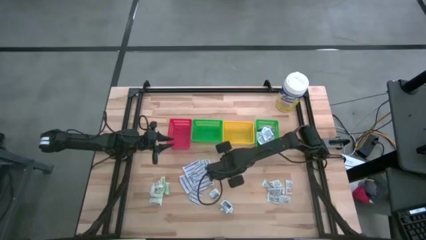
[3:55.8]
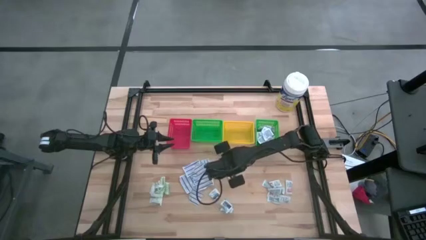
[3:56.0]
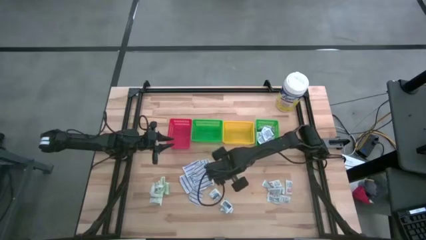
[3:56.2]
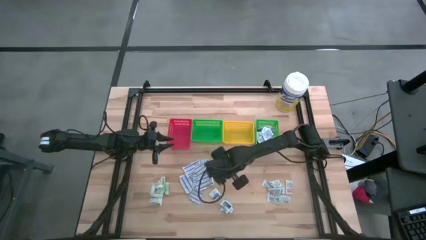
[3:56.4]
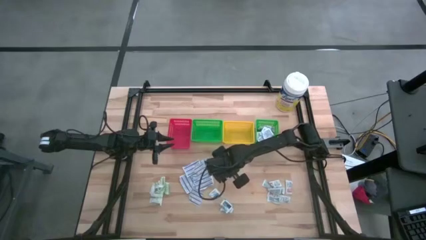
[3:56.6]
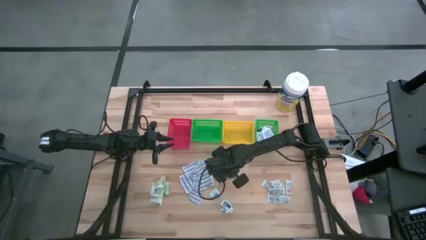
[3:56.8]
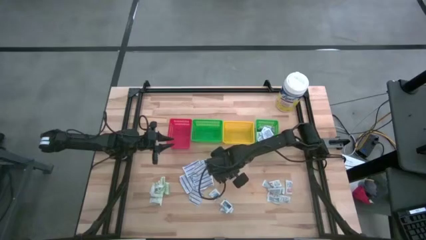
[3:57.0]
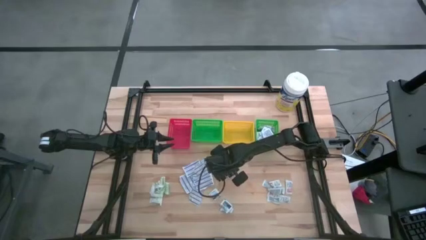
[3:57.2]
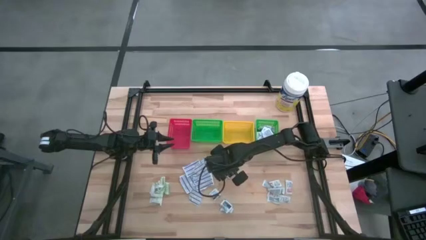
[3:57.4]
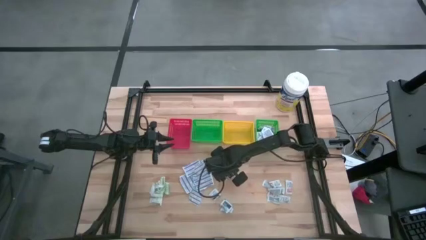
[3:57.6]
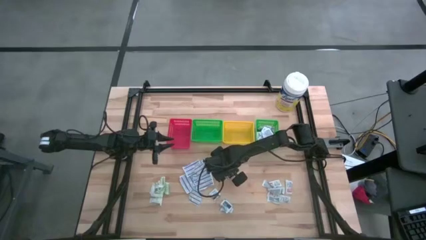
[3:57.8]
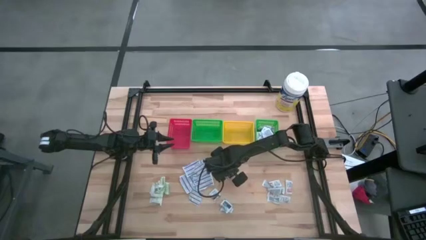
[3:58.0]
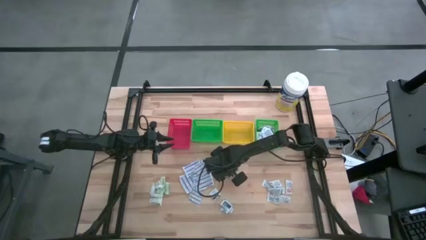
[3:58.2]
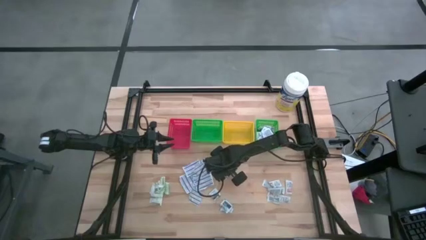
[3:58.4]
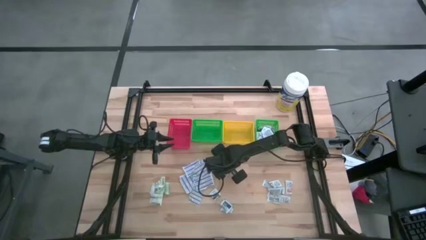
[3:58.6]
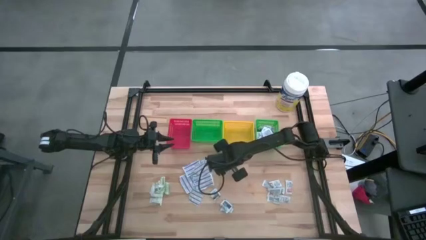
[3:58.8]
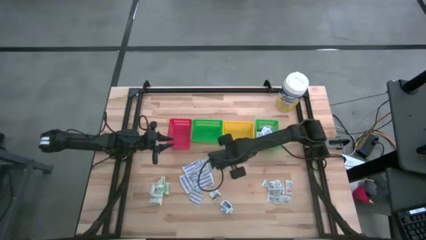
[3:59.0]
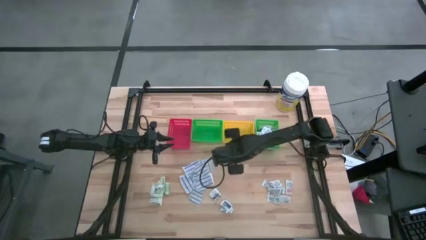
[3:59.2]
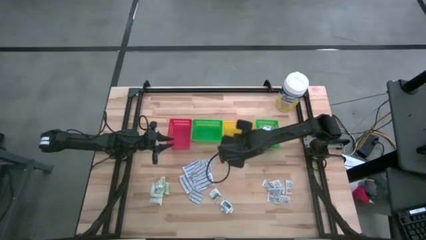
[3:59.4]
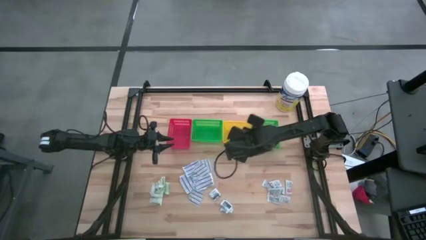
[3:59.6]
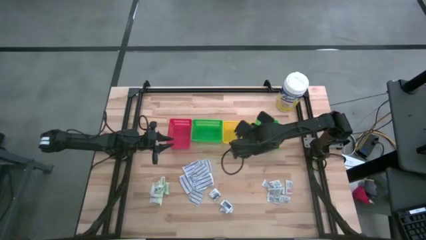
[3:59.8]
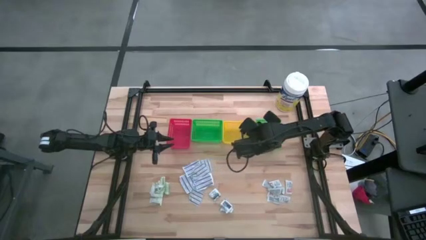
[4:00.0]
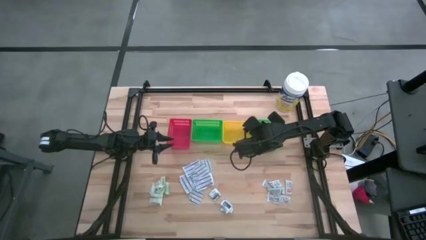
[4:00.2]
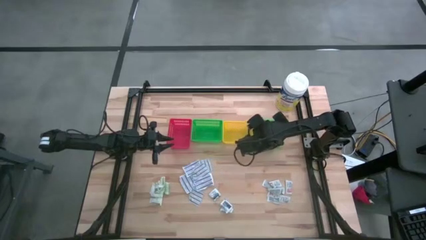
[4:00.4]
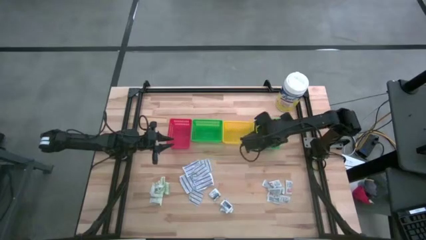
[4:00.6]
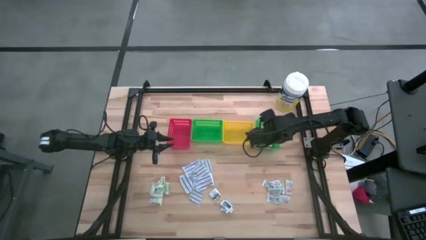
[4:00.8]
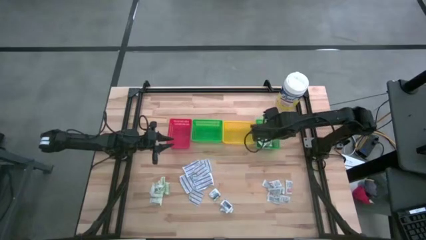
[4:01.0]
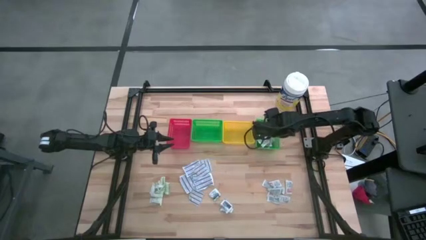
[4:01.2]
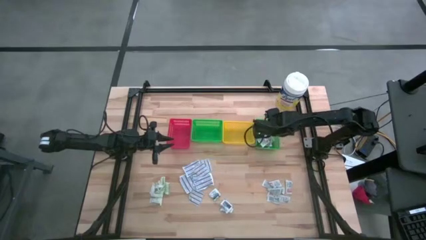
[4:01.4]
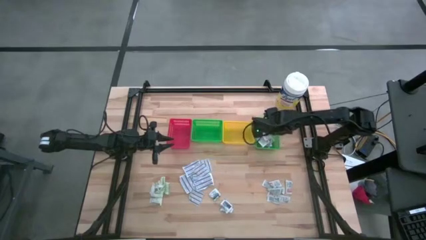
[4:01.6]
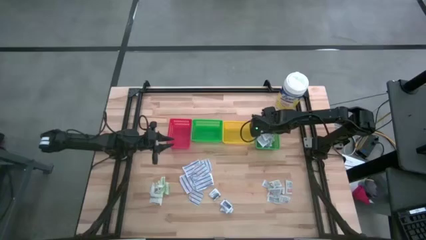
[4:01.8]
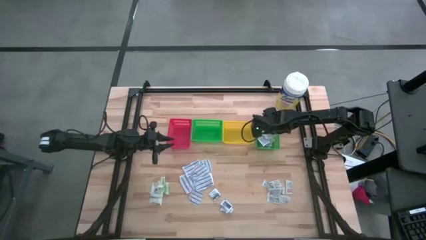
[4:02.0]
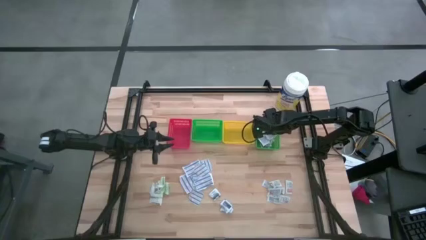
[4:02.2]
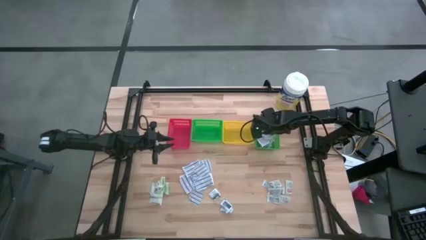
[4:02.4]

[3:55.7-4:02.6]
Task: Pick & Place First Aid Supplies
Put the blue alcohol pad into the right green bin

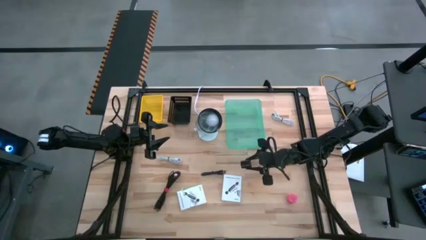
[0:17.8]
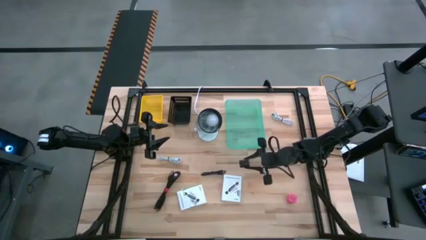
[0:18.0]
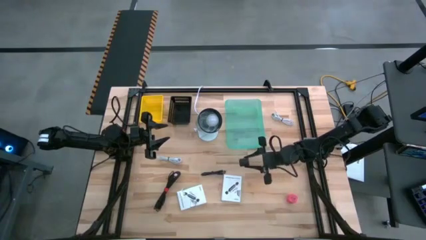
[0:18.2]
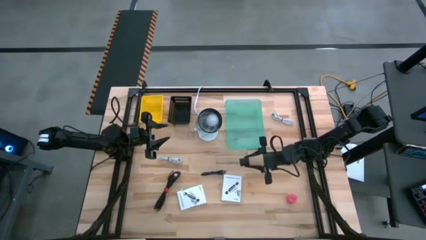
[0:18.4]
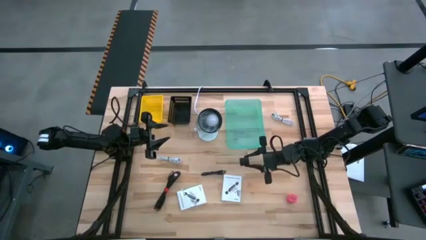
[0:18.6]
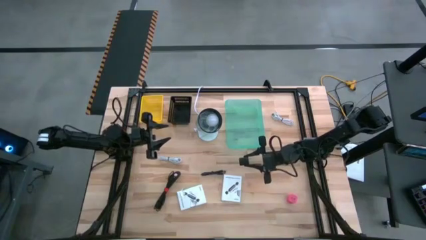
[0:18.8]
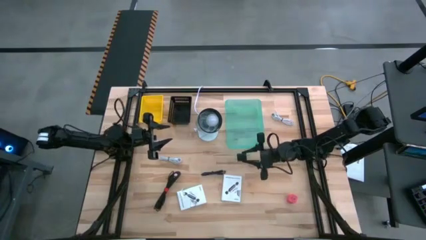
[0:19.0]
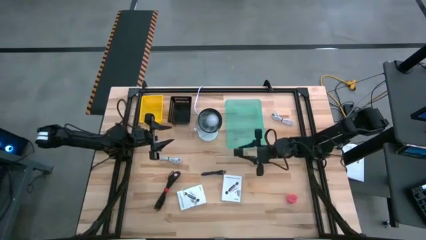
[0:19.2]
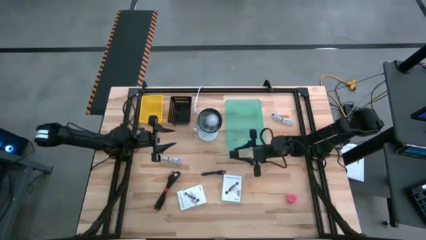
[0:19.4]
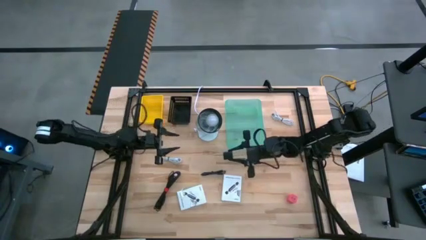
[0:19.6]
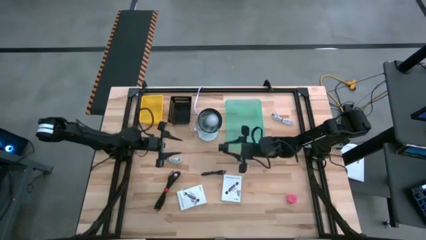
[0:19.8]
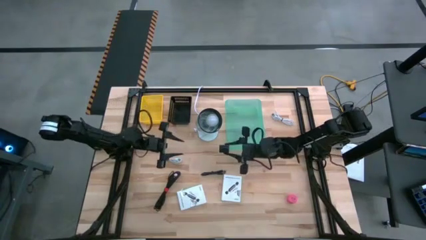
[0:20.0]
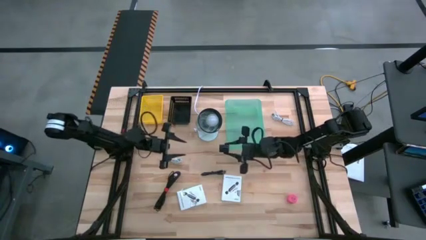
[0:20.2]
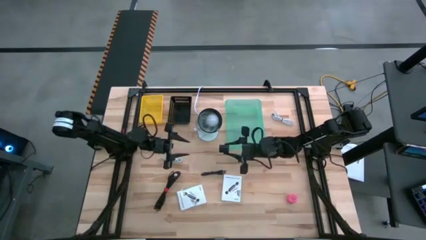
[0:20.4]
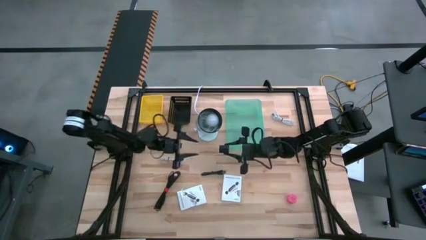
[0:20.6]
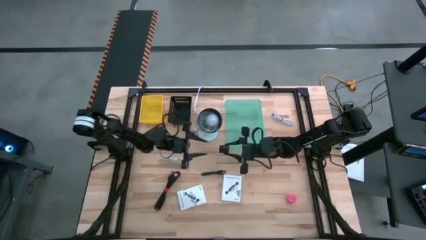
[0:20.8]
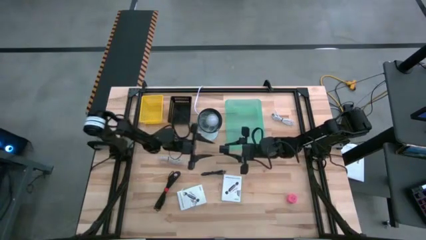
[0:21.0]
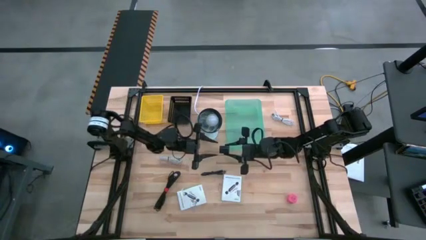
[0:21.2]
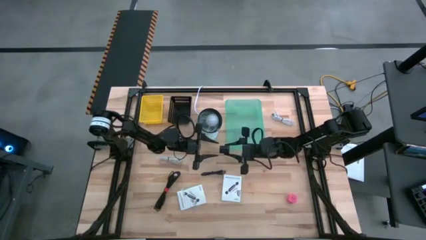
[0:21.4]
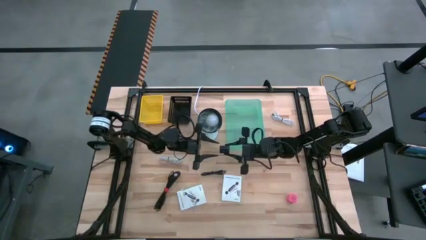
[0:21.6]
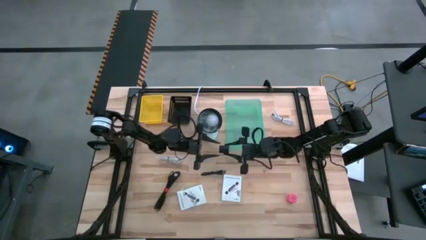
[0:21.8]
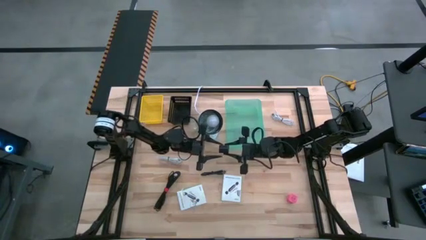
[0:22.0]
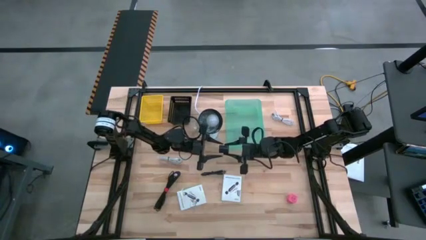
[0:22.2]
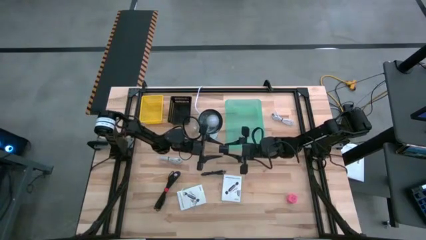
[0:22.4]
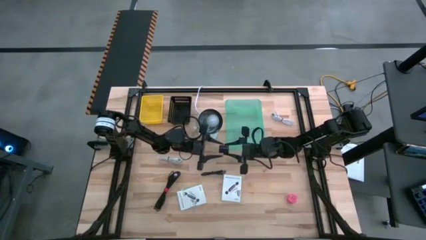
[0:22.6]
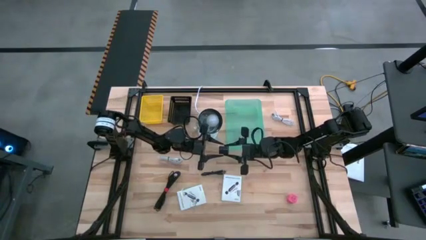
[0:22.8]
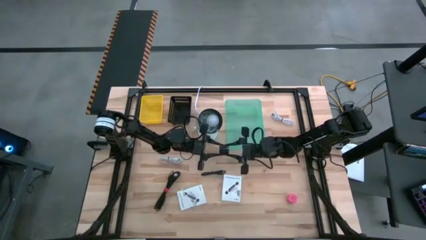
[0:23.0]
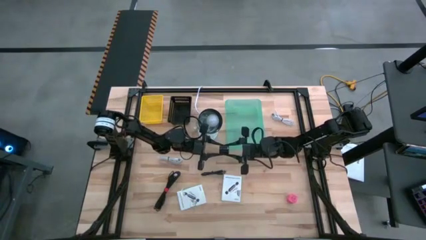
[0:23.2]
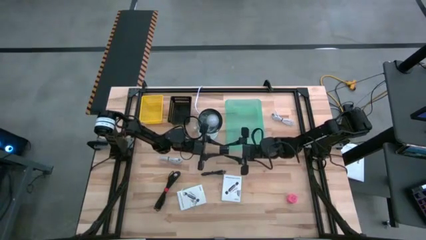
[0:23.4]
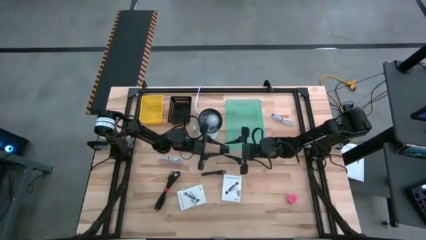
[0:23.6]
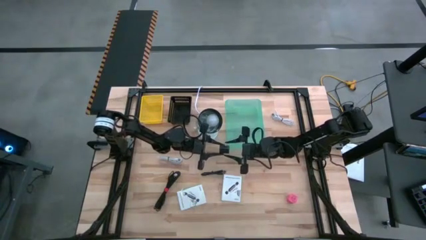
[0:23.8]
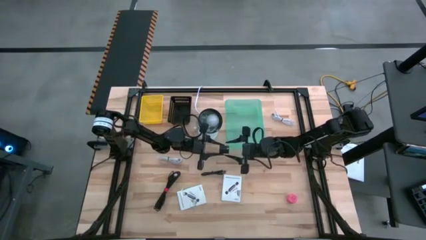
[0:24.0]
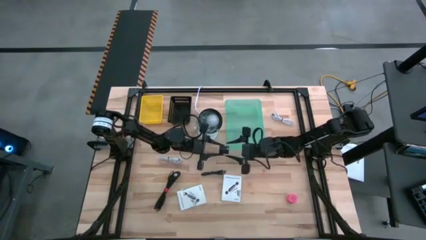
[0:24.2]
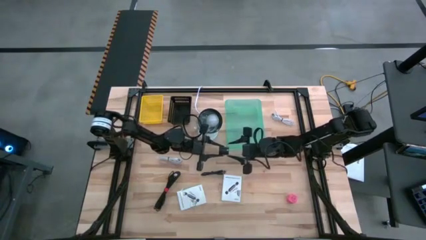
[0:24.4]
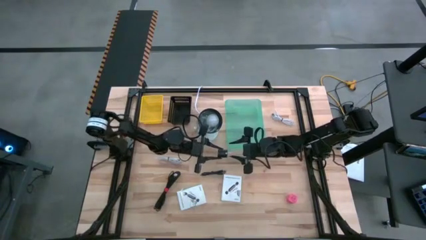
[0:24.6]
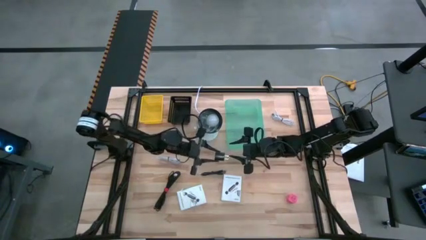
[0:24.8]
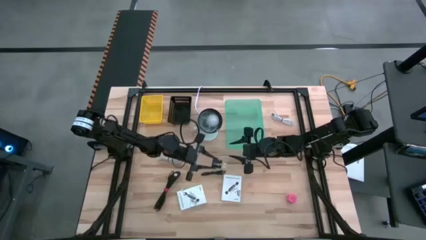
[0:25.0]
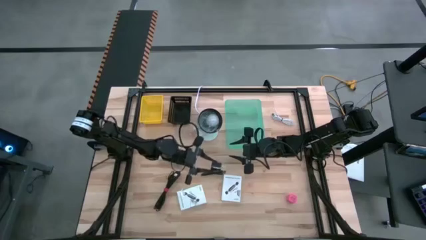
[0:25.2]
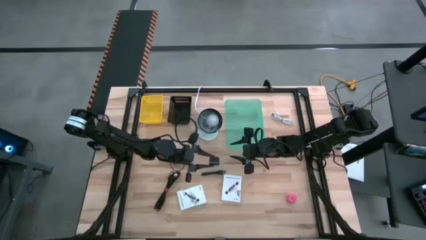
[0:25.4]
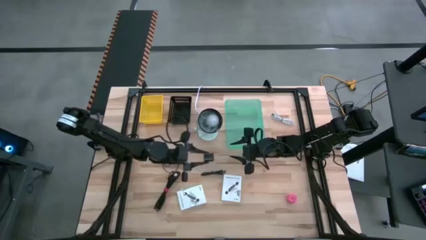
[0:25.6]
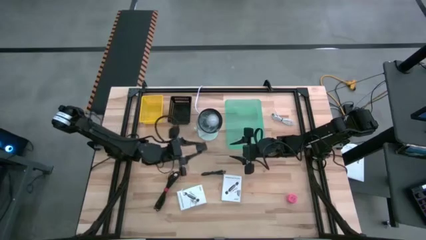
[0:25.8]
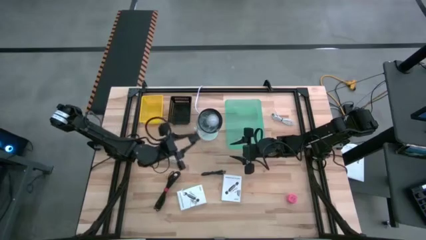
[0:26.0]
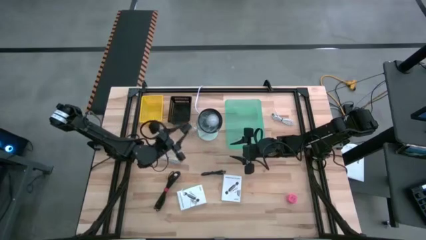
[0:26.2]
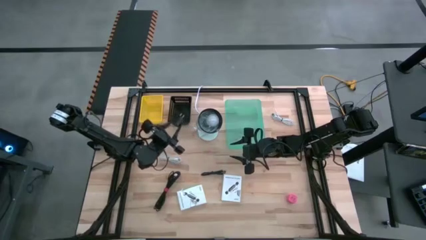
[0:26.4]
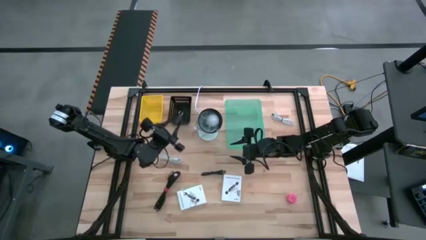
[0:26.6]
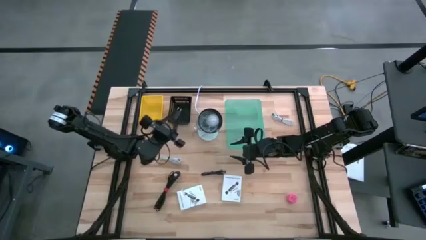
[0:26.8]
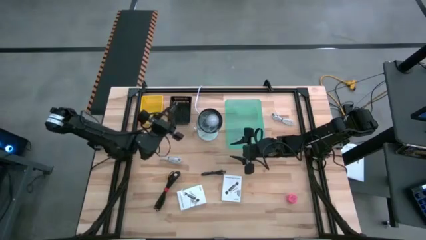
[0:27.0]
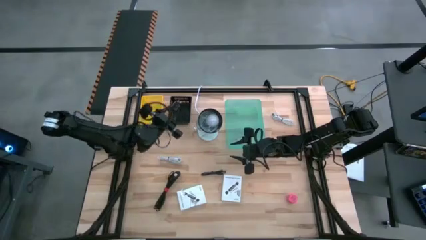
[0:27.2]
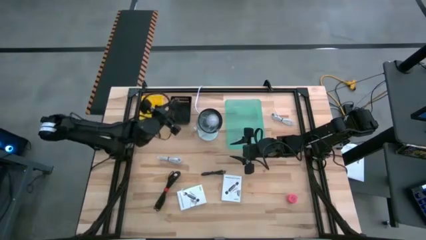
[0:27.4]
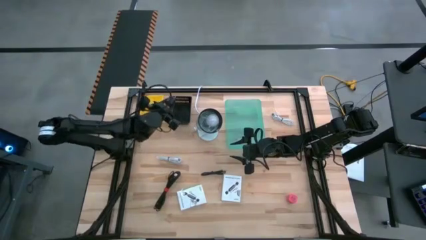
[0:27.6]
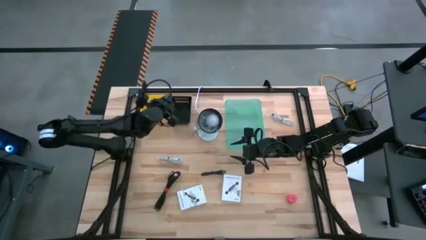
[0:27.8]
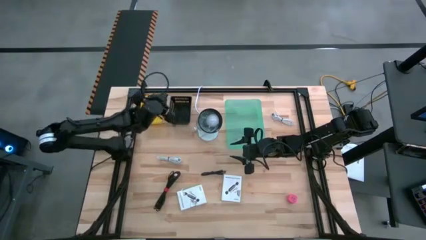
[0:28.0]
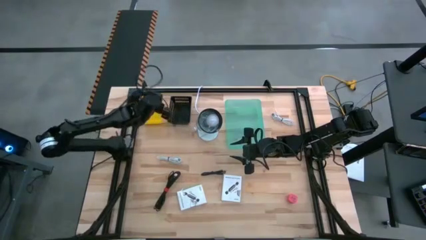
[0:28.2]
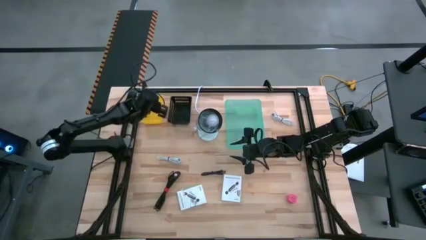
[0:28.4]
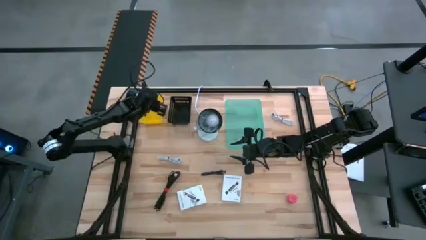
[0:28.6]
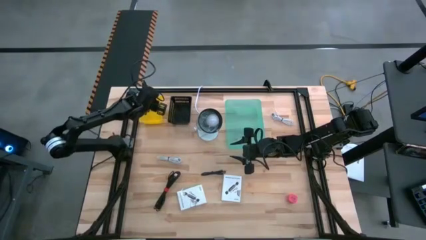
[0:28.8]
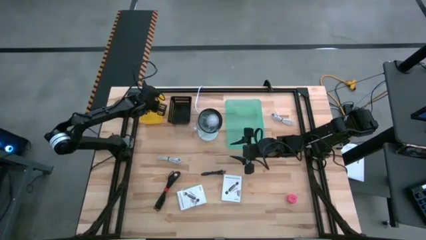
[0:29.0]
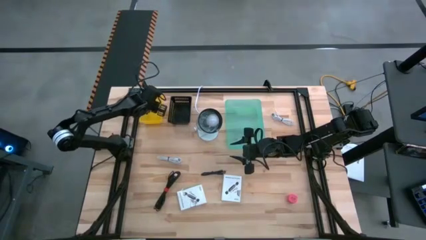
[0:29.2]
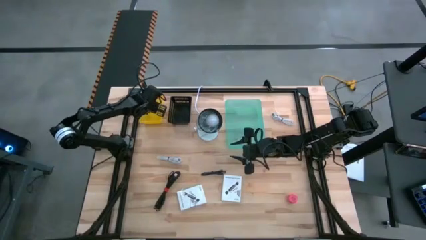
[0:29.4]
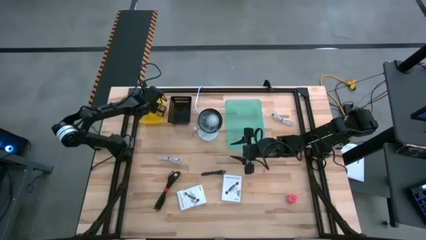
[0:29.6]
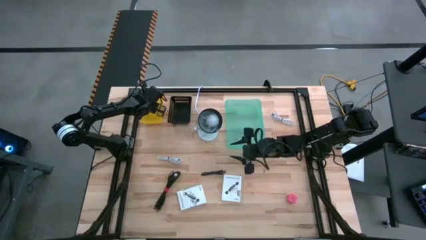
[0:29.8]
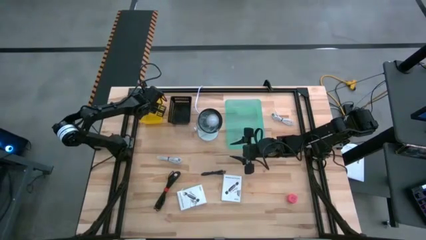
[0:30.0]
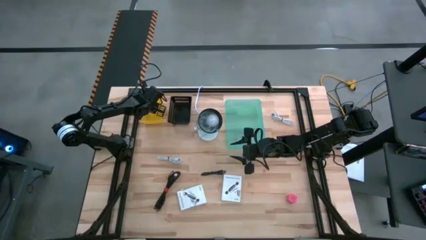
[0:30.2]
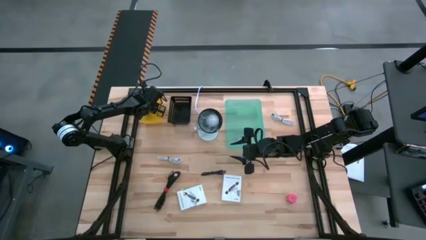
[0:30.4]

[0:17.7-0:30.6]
Task: Pick and place items into bin
Put the black charger adapter into the yellow bin
